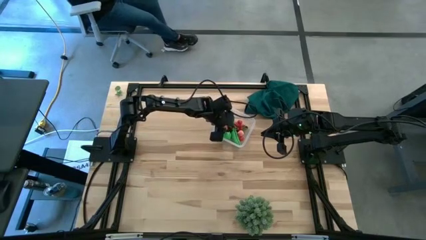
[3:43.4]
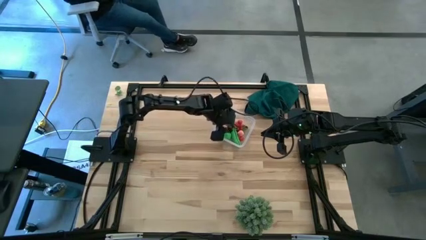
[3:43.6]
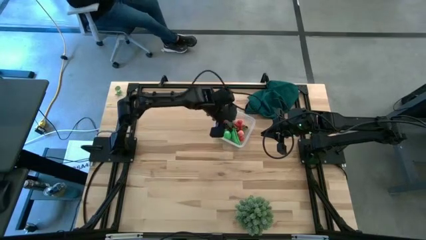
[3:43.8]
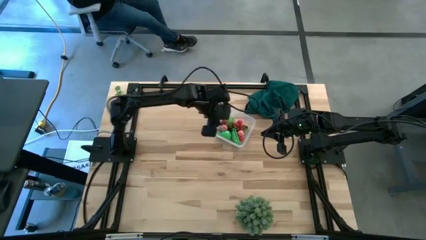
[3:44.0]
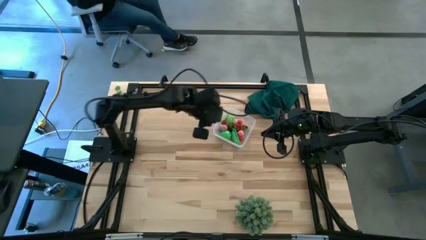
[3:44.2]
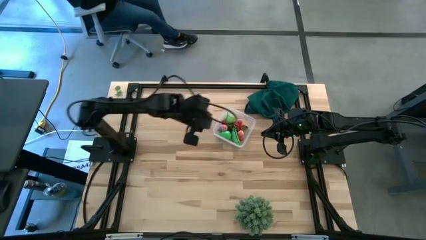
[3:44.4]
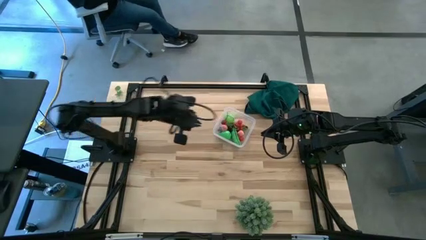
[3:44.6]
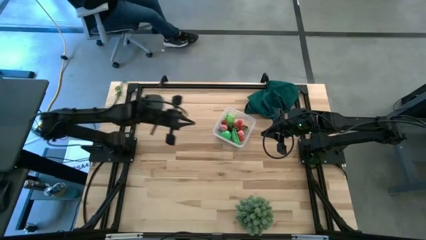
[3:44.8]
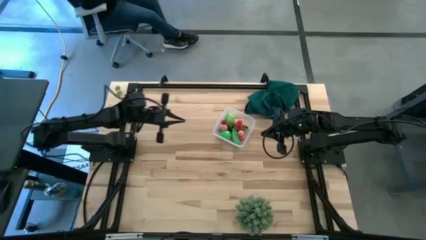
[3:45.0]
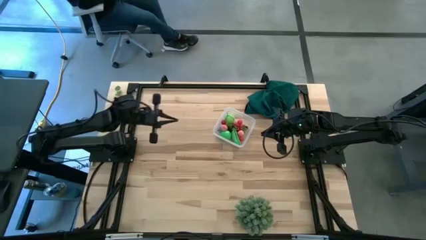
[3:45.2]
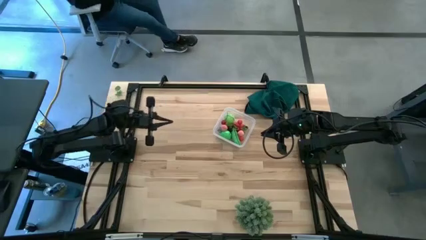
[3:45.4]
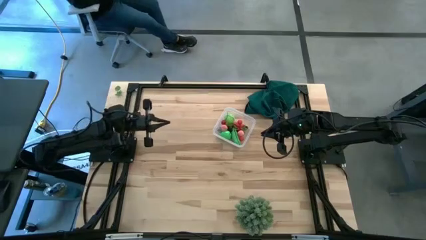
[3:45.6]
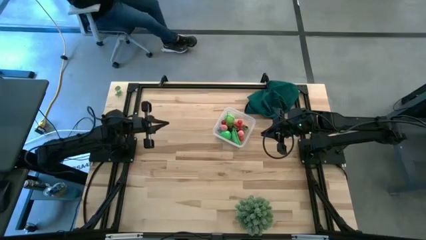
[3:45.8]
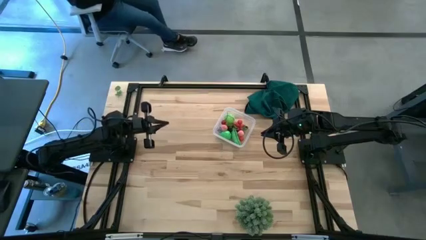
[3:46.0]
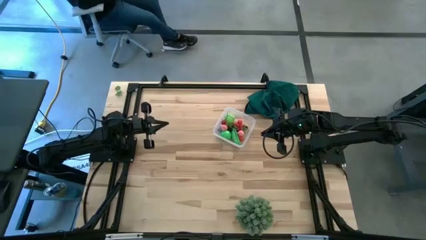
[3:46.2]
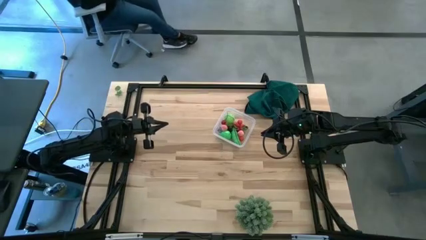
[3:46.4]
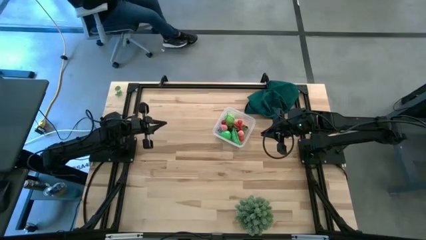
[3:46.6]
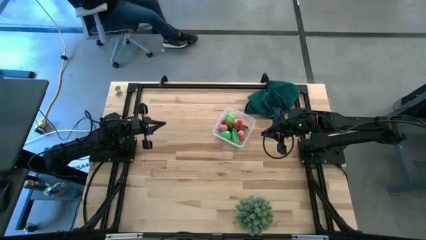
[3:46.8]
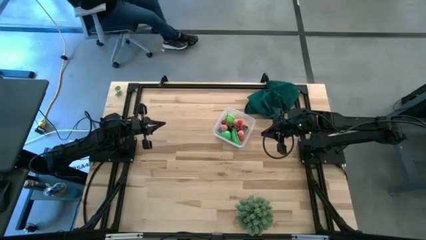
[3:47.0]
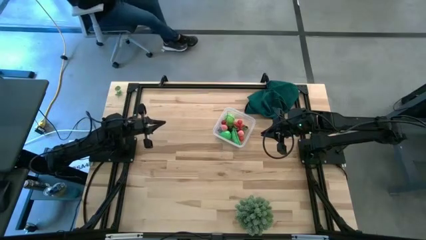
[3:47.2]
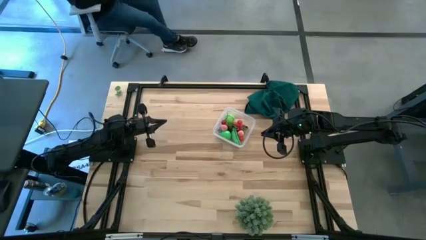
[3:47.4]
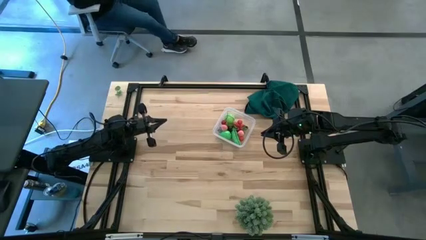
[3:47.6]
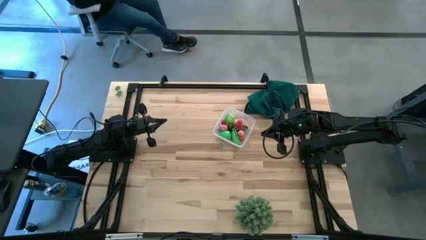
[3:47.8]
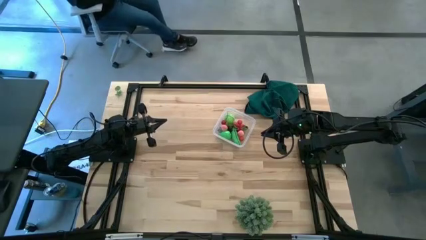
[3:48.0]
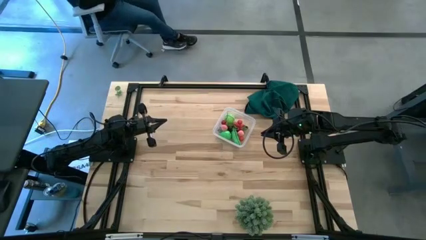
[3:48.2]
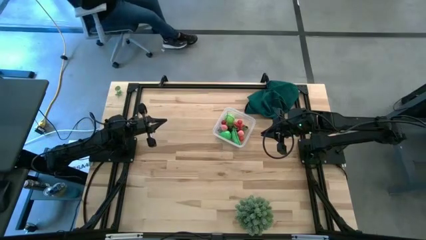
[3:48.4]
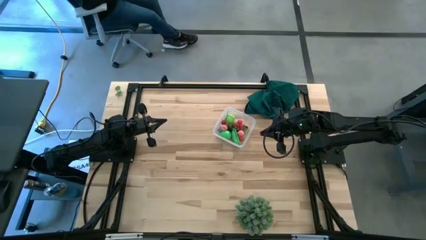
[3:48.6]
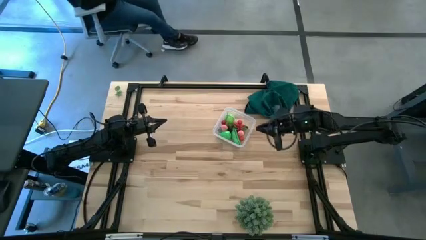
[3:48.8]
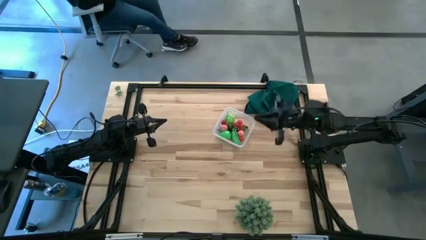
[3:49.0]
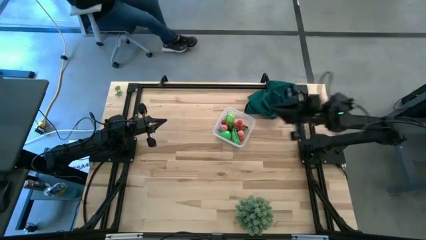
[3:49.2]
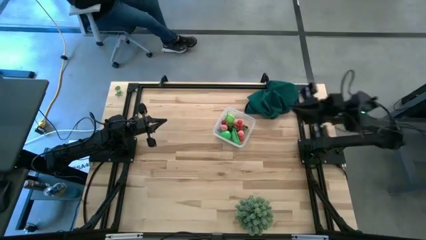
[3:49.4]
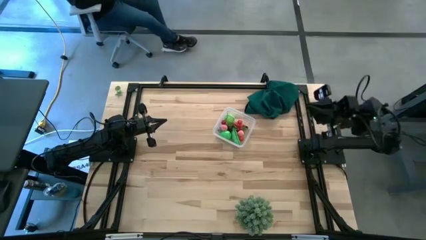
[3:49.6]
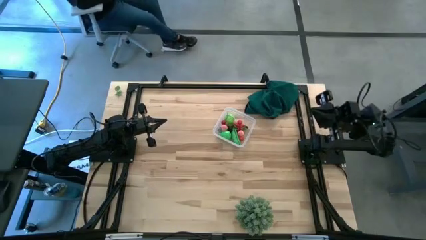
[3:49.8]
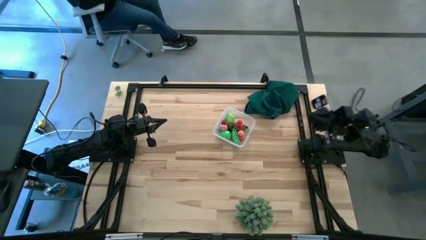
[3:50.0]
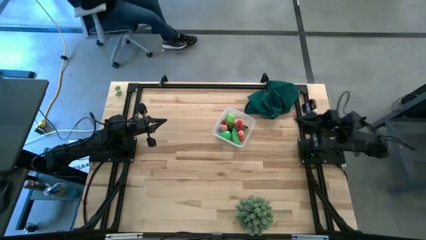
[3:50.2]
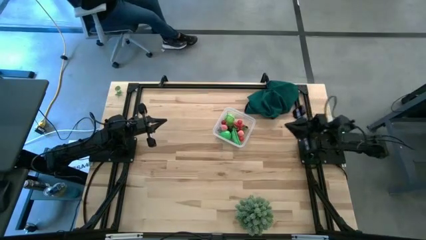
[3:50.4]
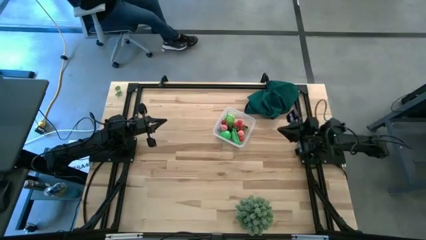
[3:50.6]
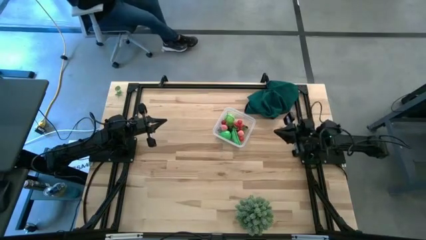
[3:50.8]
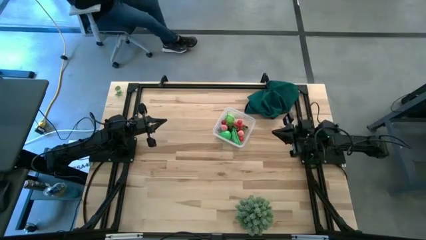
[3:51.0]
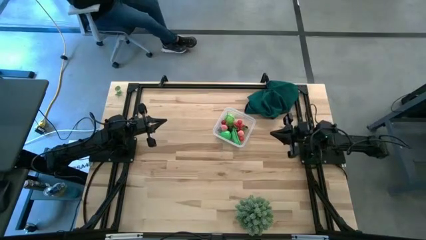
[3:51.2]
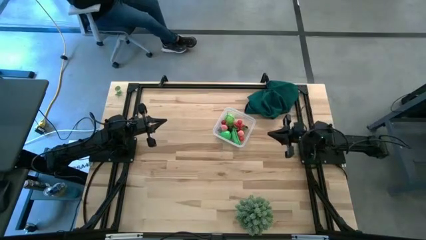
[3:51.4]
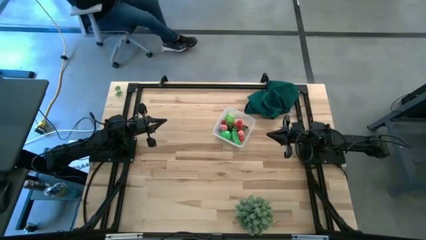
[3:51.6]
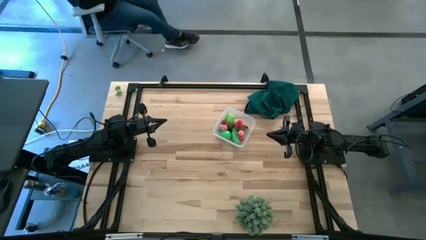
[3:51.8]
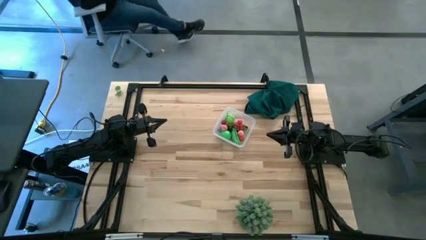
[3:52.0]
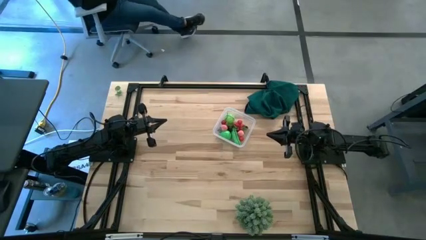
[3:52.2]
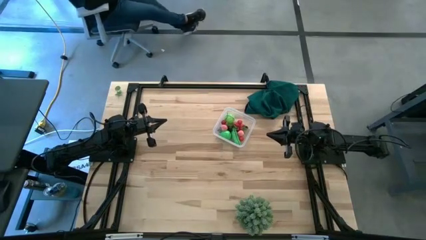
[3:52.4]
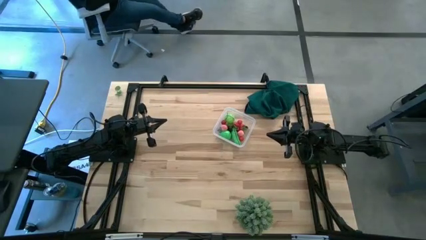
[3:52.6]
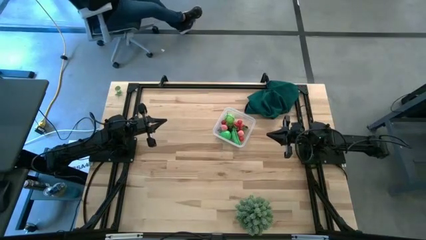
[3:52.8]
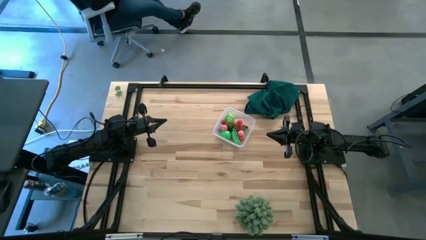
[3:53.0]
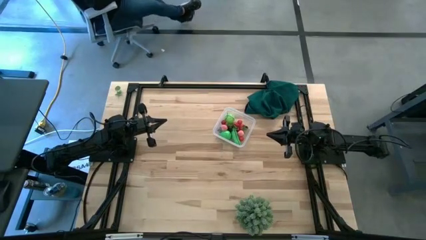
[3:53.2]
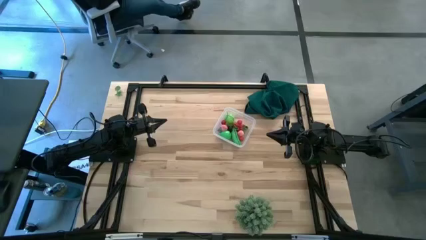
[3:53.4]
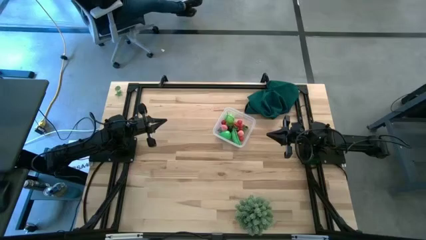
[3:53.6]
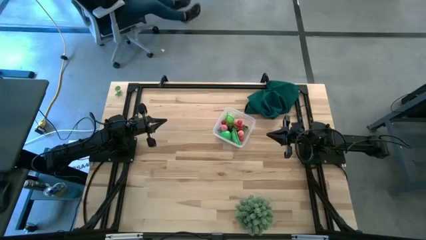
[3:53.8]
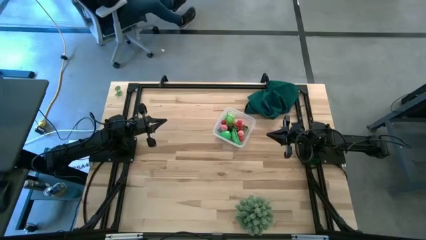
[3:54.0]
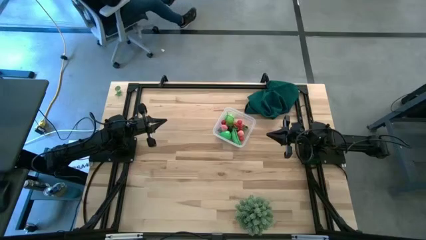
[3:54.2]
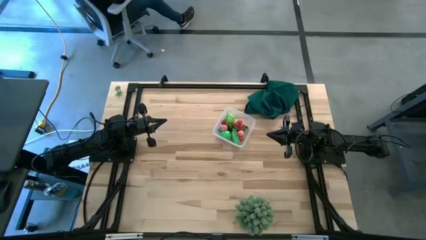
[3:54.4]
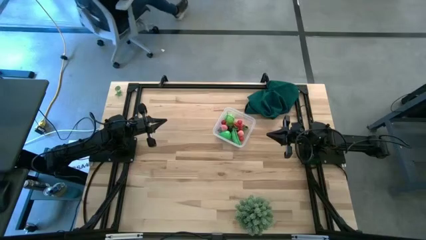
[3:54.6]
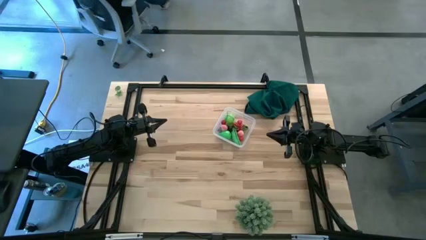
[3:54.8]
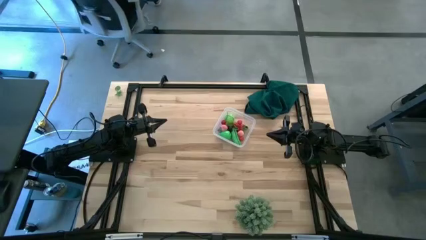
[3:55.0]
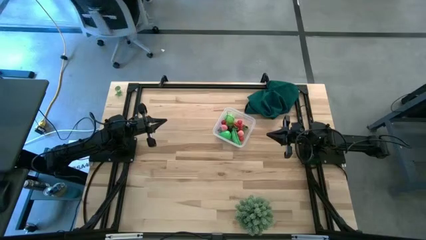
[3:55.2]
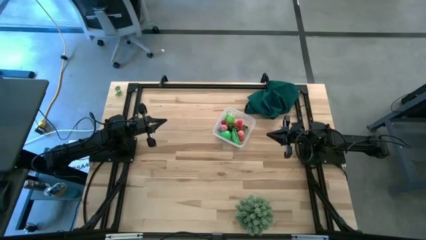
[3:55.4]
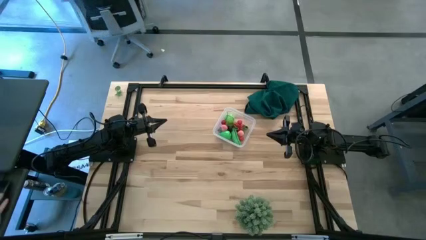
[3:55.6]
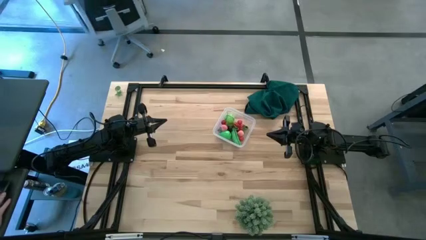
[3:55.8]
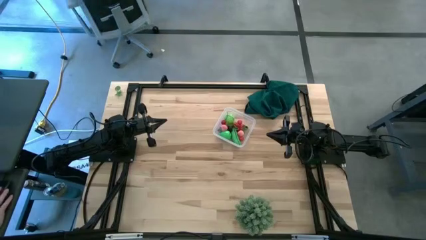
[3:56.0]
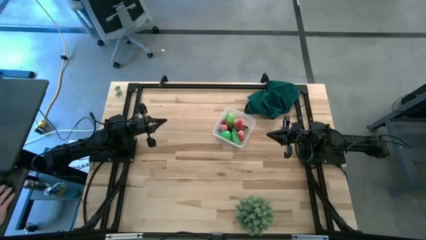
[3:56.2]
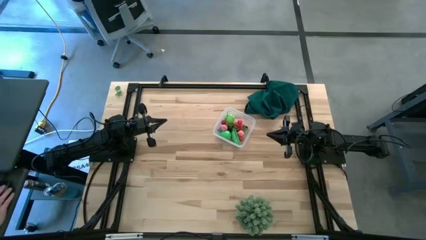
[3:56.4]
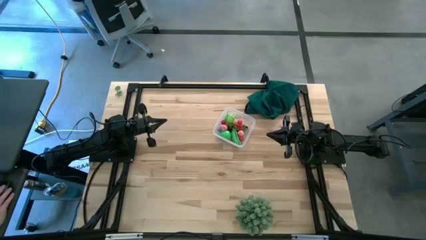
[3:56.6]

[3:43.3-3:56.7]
Task: Pick and placing Produce into tupperware
Return to Home Position

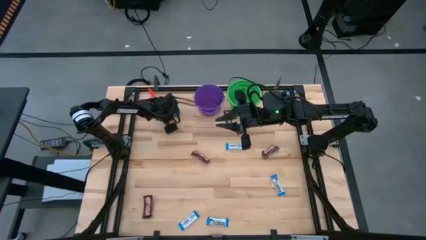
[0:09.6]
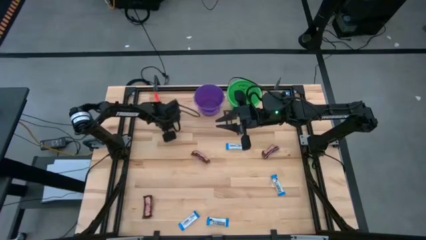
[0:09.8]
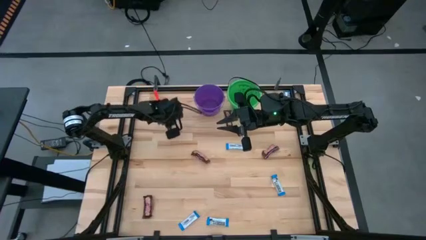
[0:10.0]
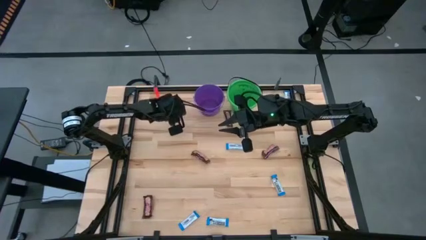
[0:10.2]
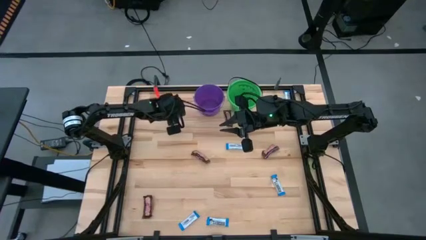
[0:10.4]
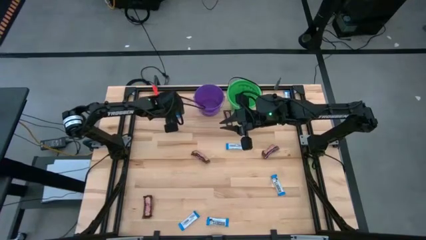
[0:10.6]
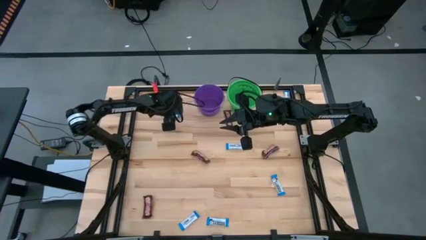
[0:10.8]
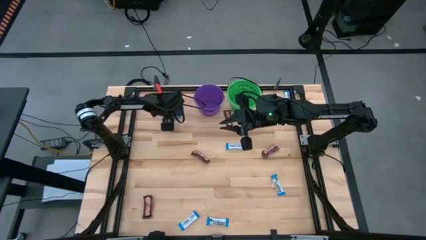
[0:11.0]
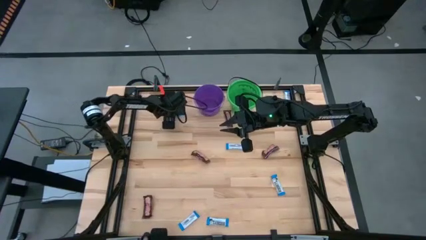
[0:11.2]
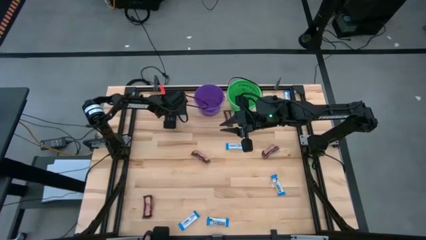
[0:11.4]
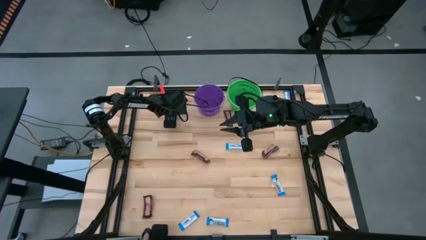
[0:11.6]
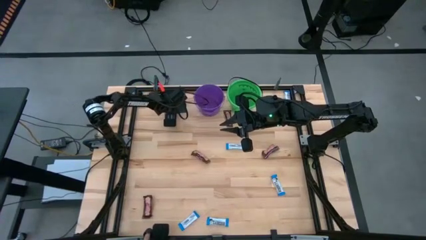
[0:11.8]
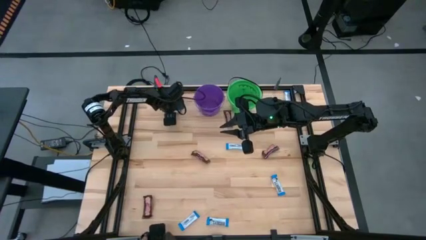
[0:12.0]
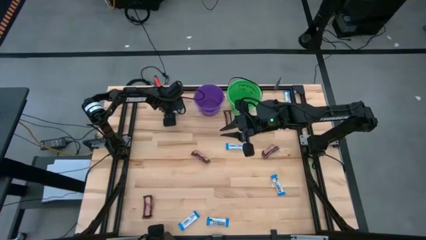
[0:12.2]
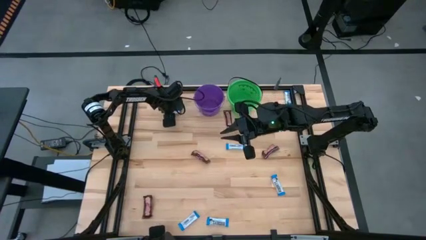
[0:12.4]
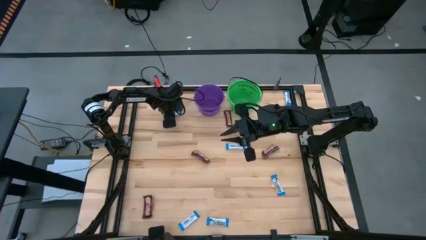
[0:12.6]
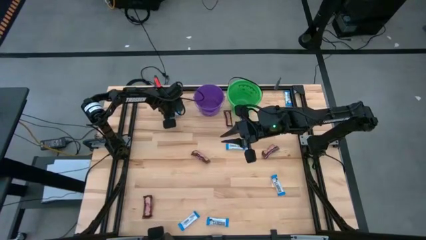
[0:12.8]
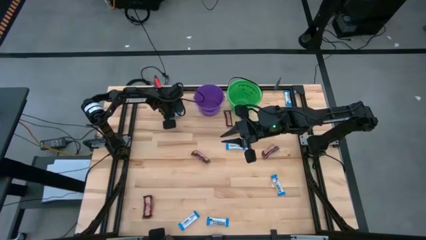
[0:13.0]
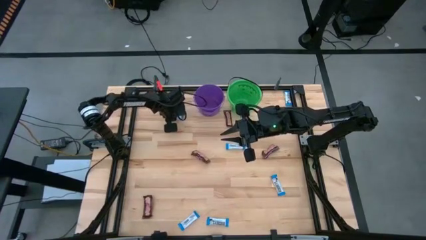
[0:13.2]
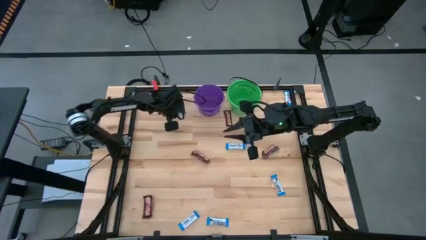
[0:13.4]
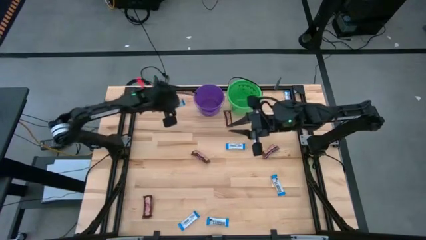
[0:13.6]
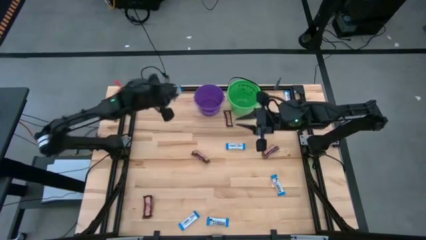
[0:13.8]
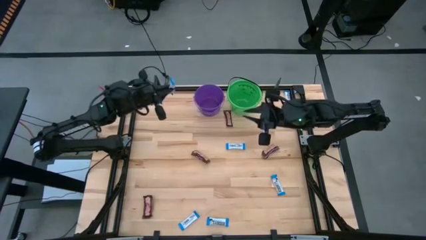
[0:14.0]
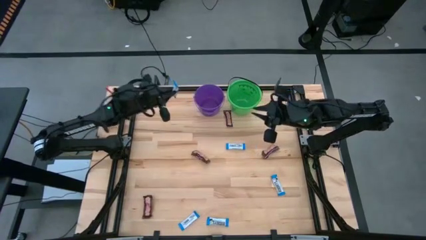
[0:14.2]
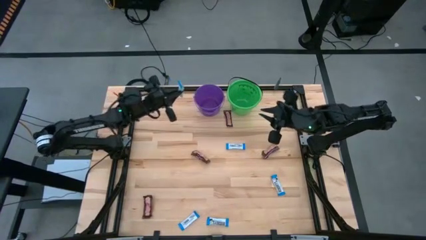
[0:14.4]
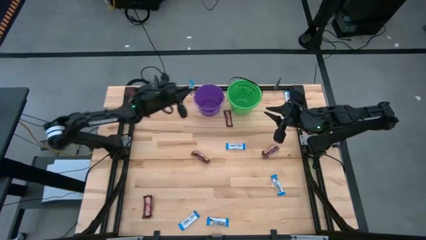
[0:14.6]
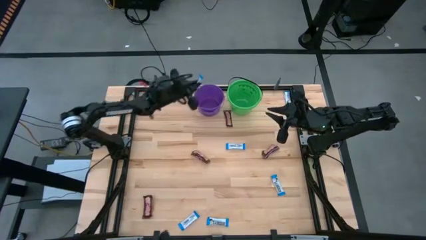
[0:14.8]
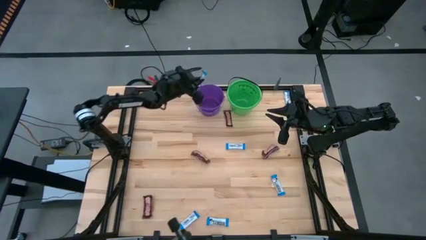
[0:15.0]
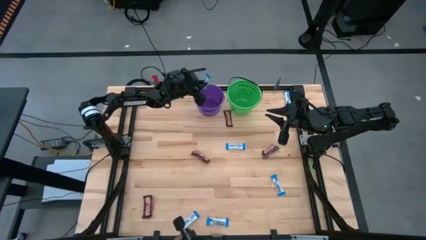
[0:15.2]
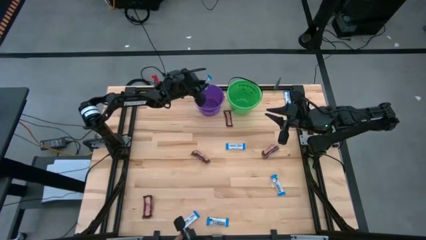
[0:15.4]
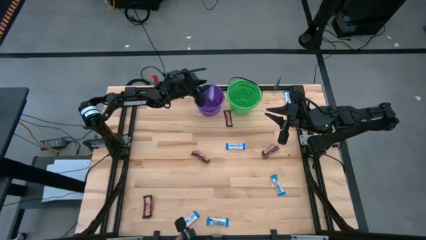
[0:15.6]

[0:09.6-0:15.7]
Task: Sort candy by brand, put in halloween buckets
Put the white chocolate bar into the purple bucket
